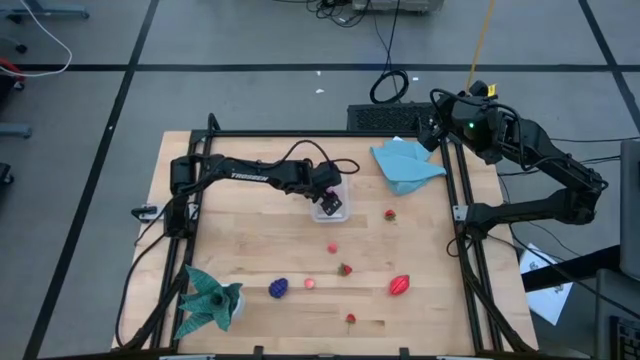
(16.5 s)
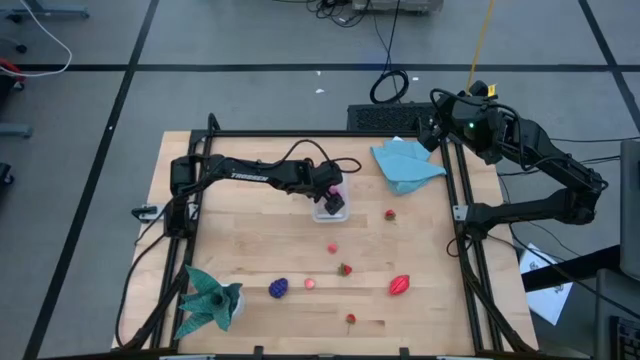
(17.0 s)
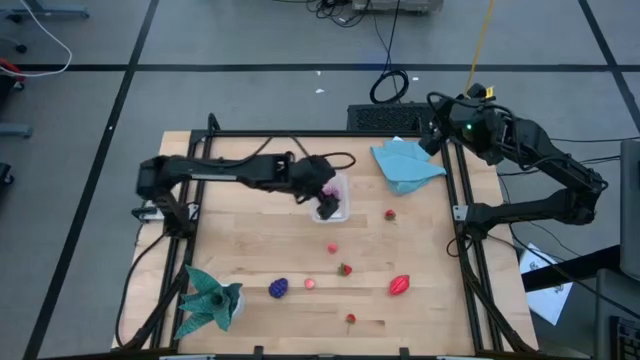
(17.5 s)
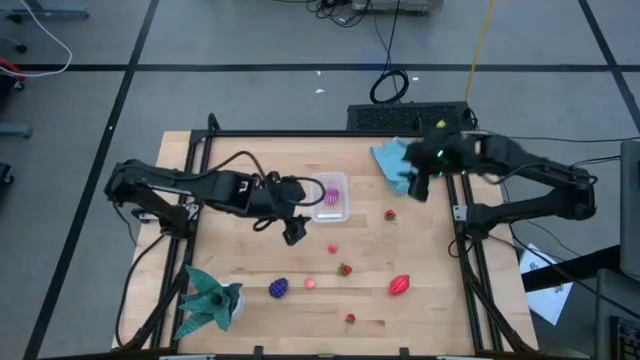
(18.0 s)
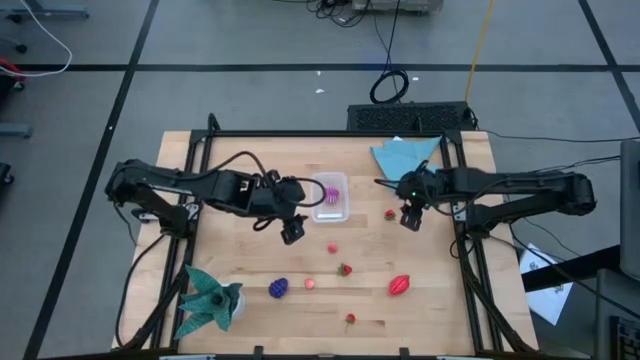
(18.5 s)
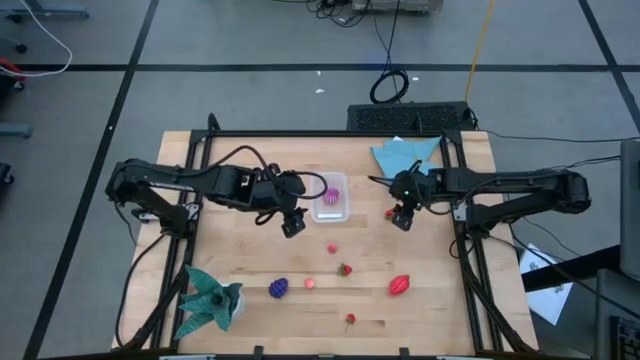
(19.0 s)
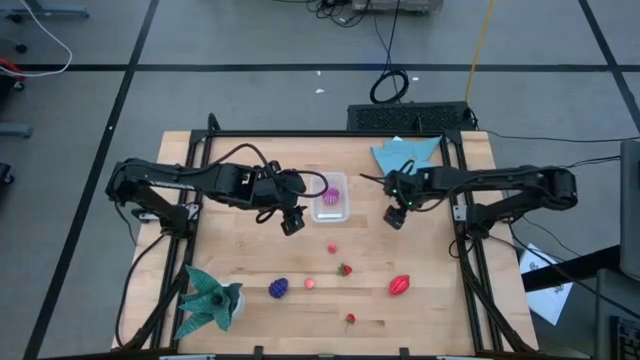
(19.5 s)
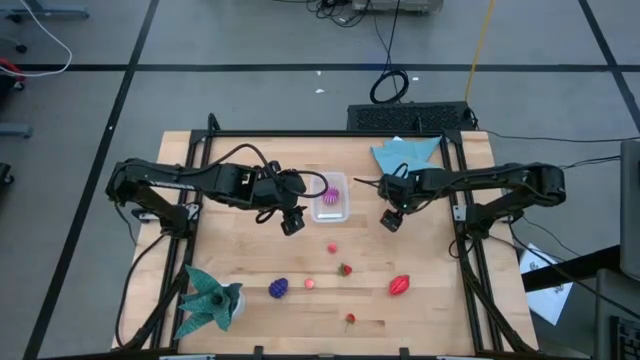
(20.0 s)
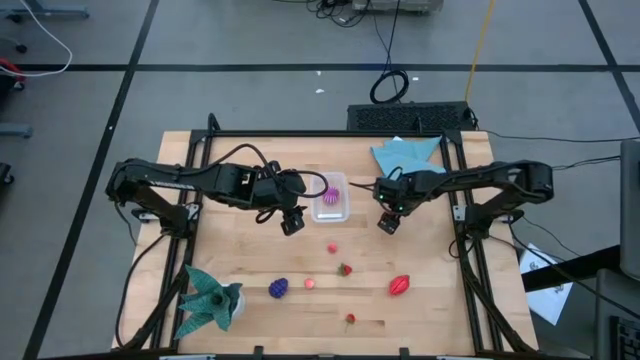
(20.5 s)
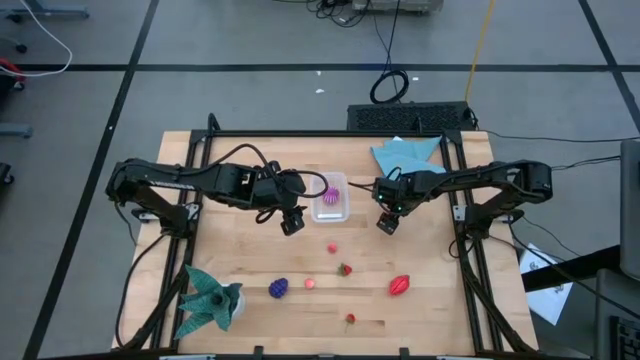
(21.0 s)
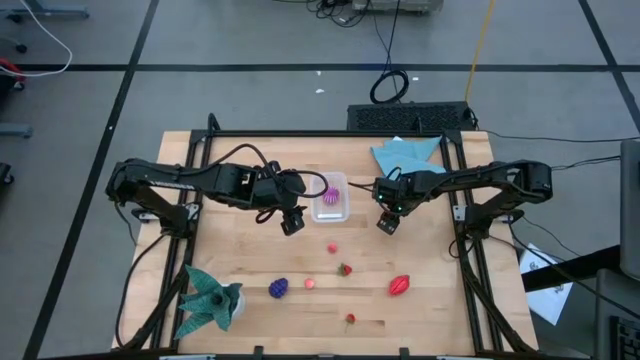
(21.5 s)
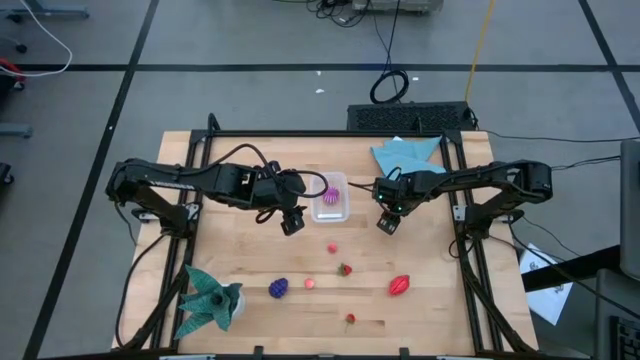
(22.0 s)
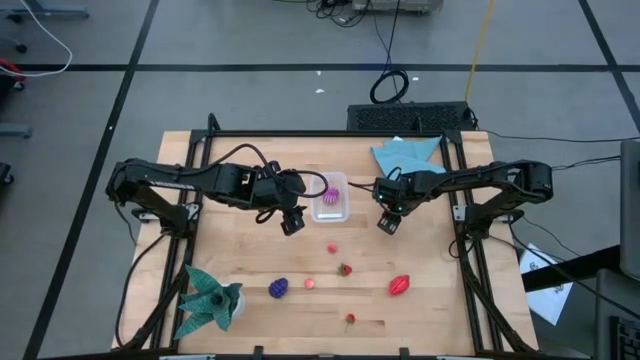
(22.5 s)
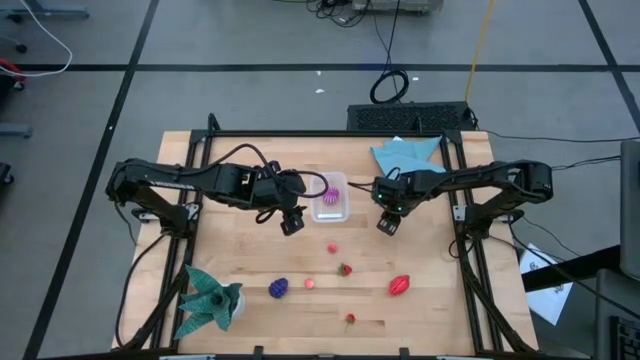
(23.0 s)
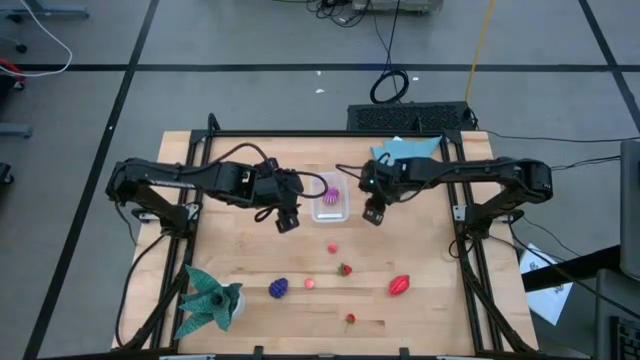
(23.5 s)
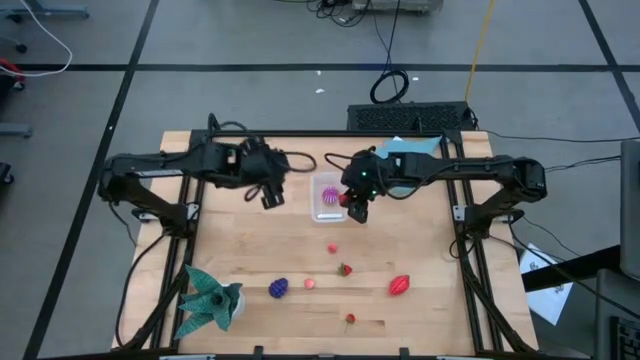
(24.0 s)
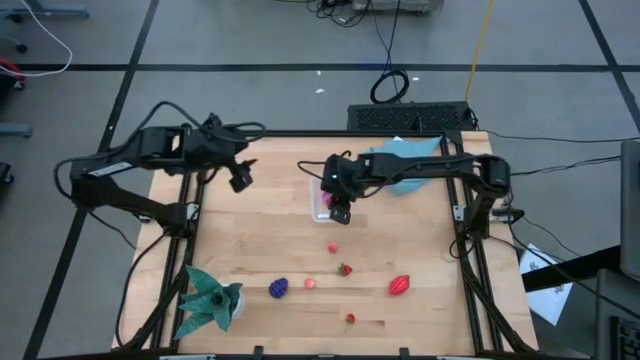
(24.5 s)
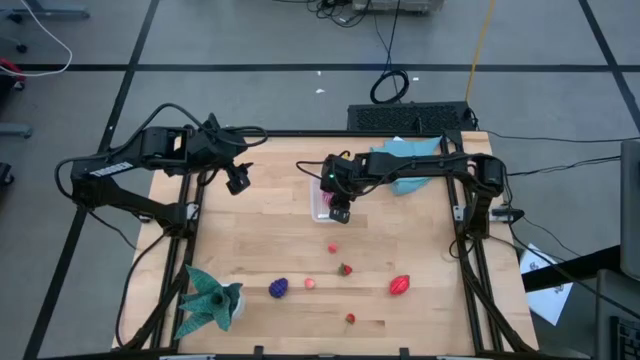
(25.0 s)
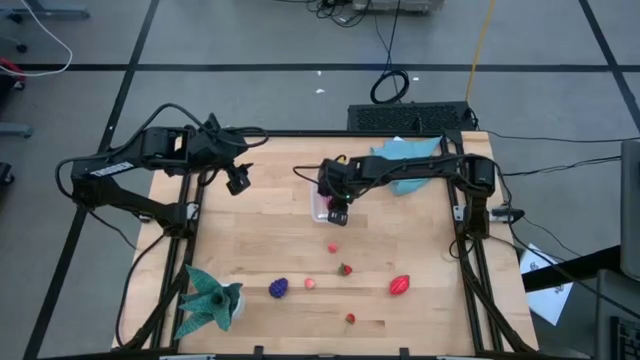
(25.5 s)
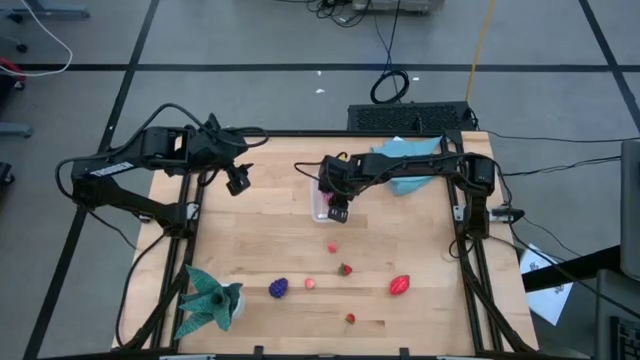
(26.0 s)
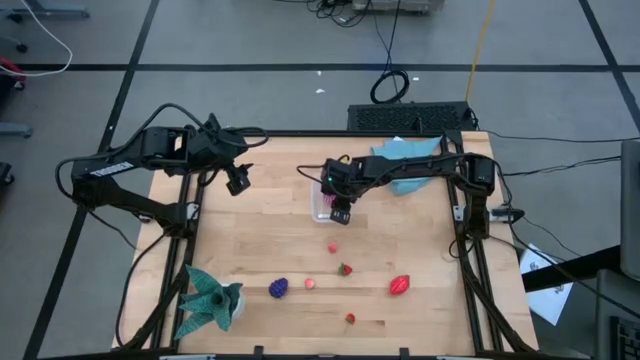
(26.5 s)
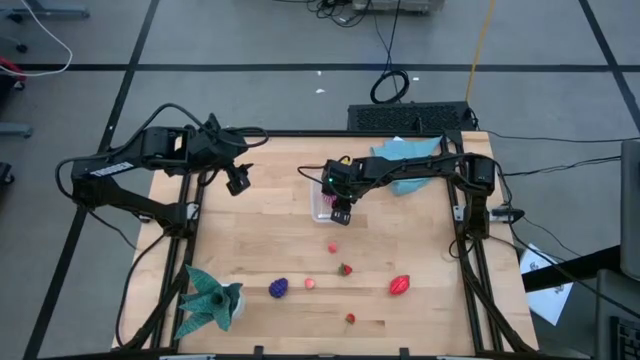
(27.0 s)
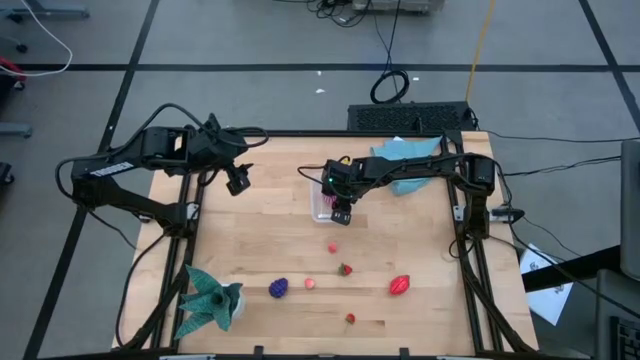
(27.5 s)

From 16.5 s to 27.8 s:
Task: Pick and placing Produce into tupperware
Put the top red strawberry into the transparent bin

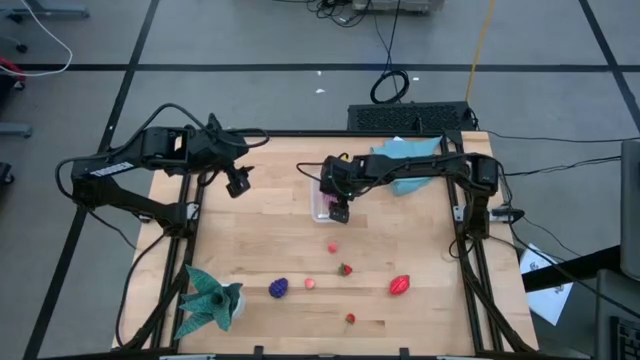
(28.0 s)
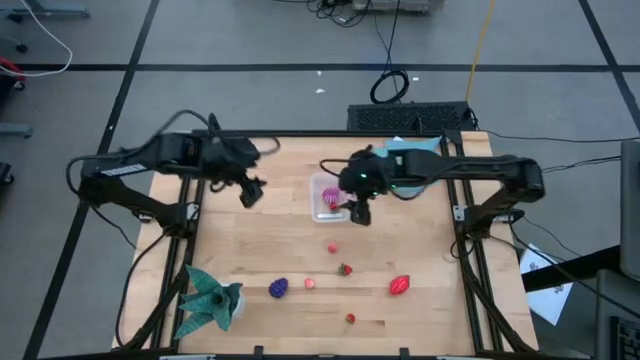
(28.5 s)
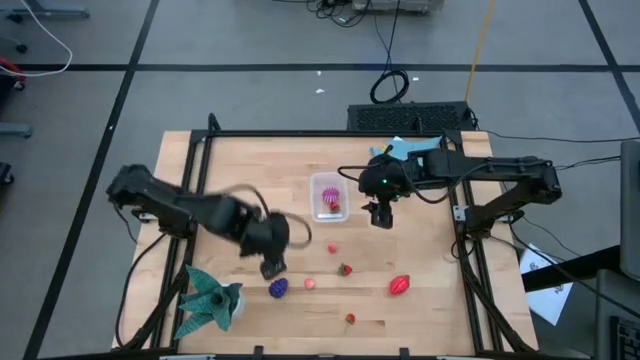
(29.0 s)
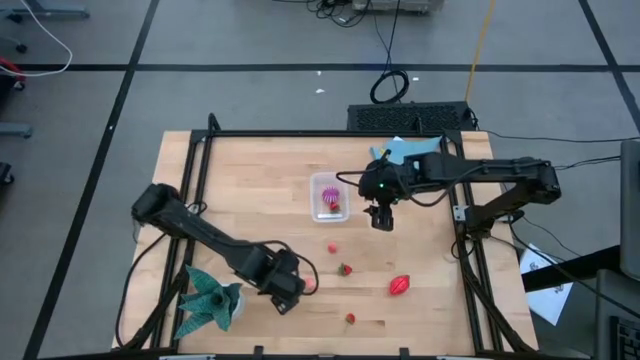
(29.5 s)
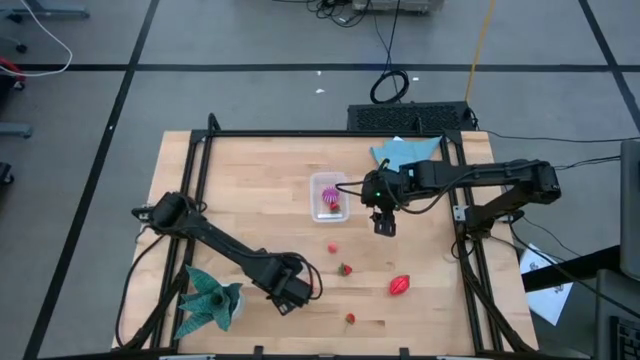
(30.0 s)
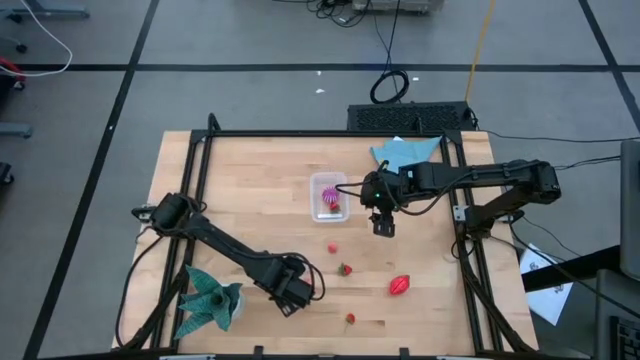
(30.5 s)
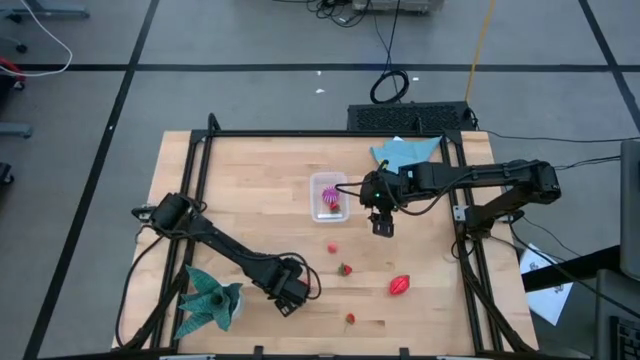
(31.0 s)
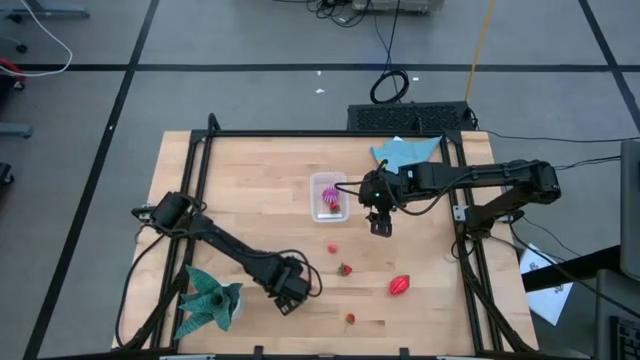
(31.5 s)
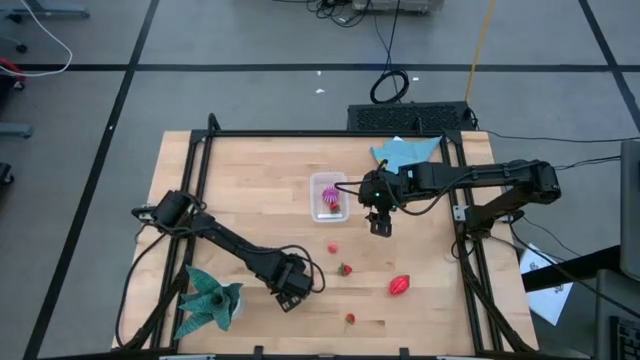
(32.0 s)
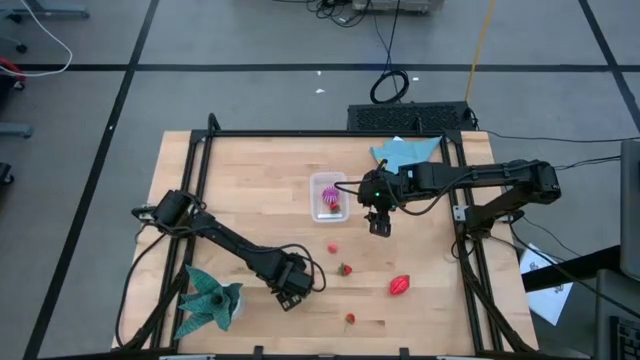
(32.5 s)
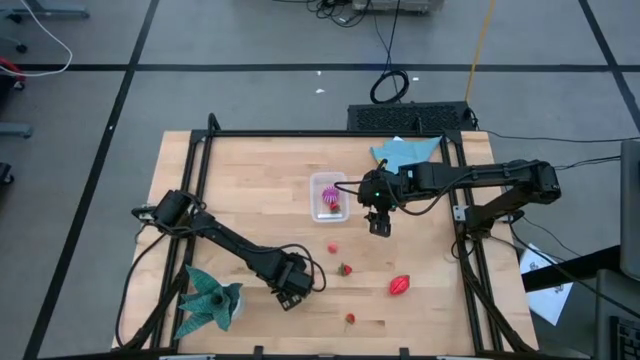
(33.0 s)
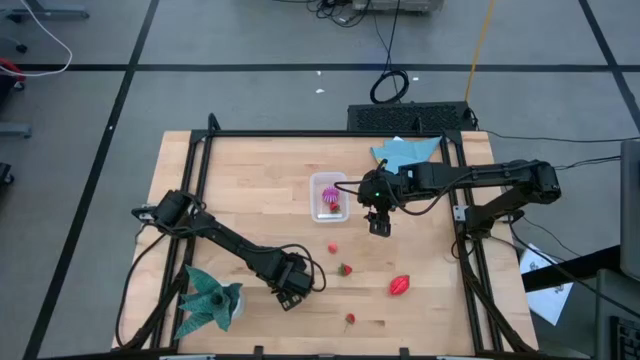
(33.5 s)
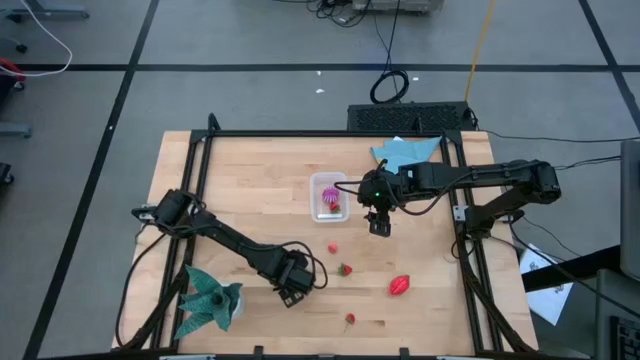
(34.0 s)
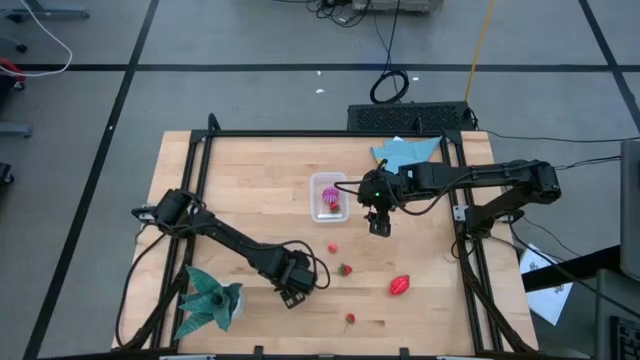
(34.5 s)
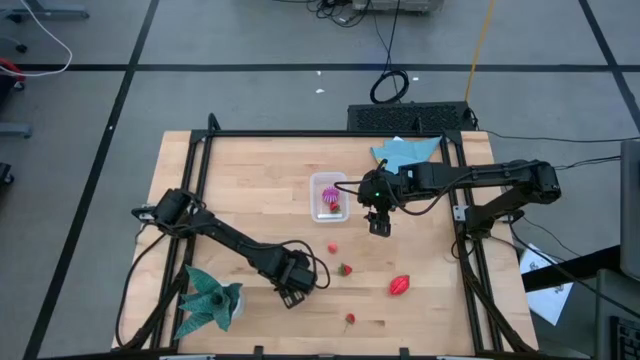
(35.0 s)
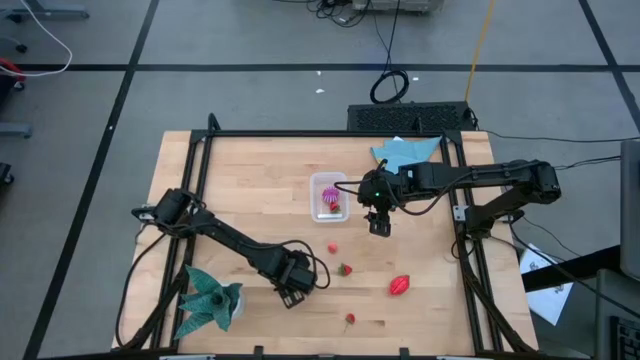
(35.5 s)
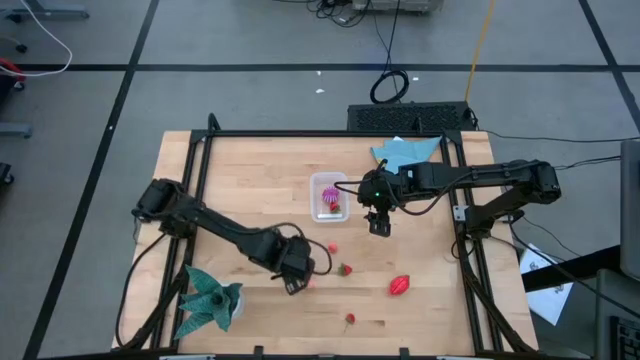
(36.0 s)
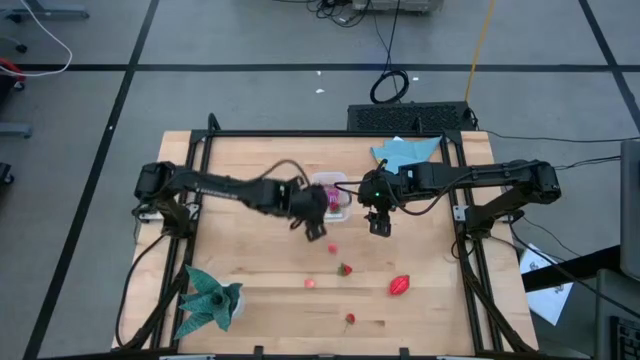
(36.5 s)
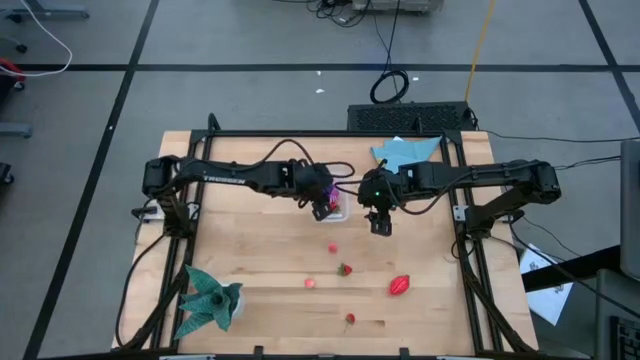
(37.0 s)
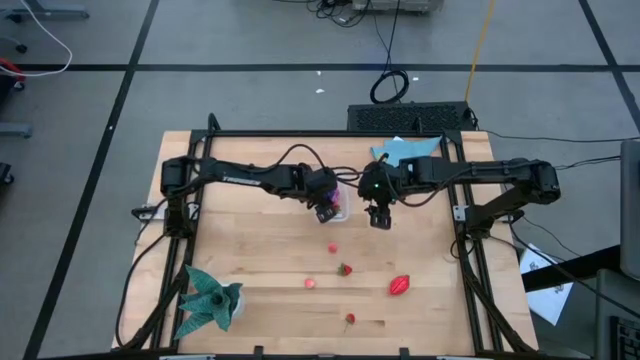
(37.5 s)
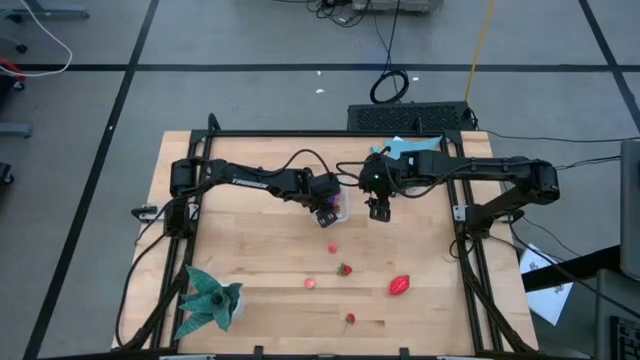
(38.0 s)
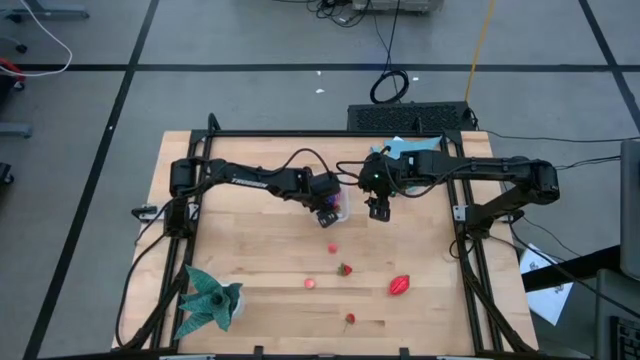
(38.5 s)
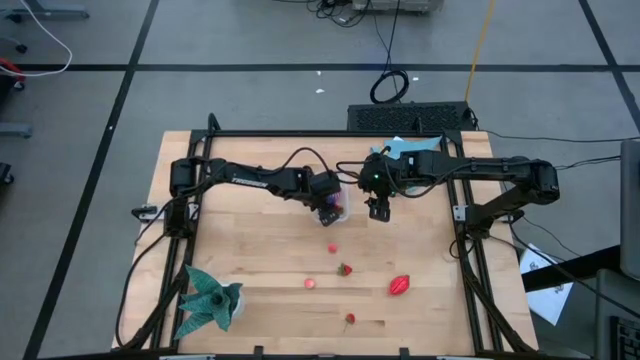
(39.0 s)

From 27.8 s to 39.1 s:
Put the purple grapes into the transparent bin
